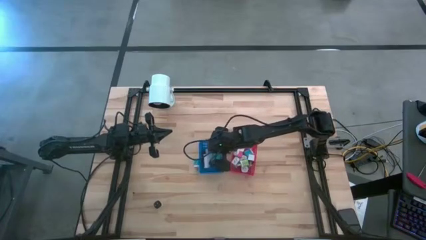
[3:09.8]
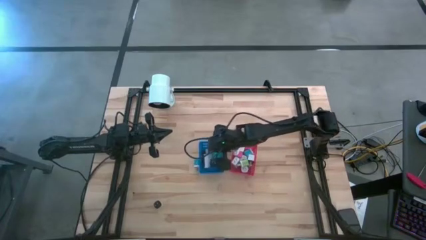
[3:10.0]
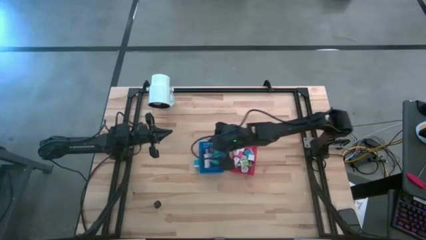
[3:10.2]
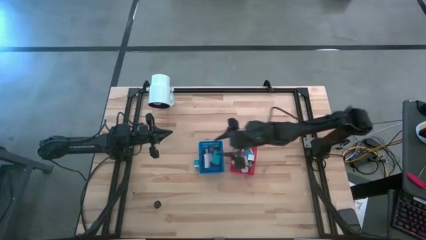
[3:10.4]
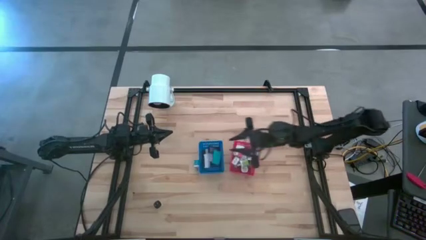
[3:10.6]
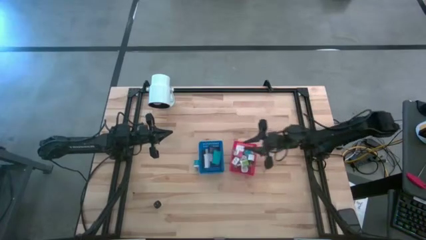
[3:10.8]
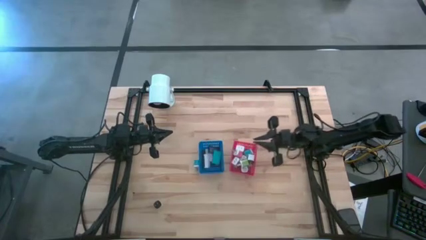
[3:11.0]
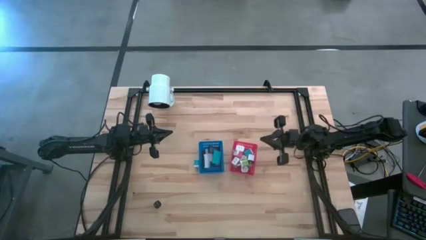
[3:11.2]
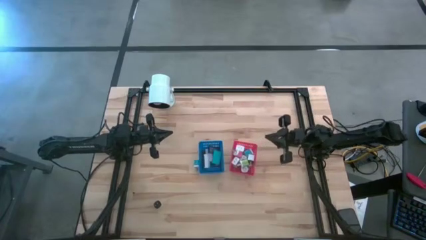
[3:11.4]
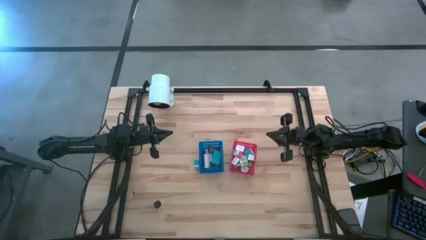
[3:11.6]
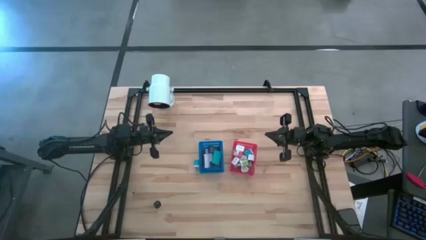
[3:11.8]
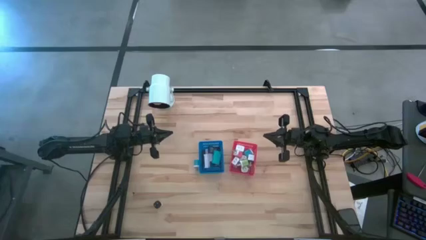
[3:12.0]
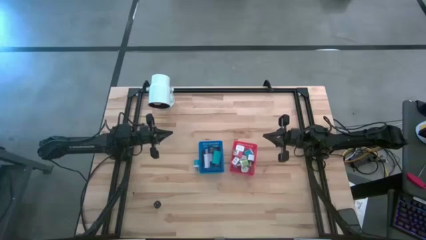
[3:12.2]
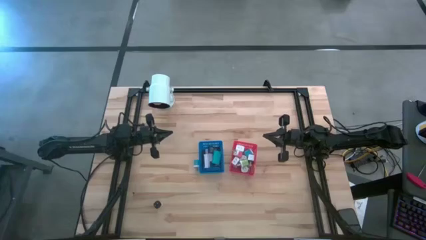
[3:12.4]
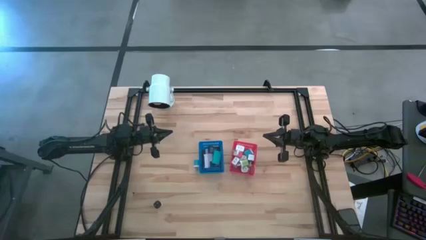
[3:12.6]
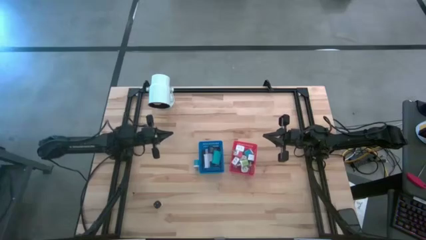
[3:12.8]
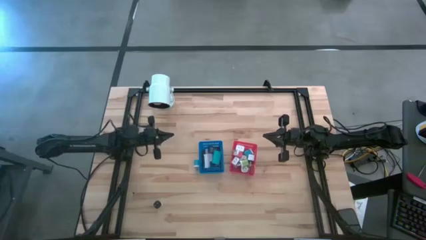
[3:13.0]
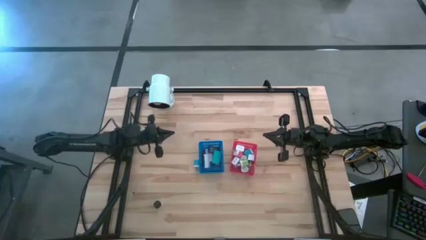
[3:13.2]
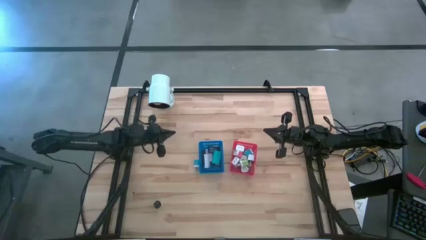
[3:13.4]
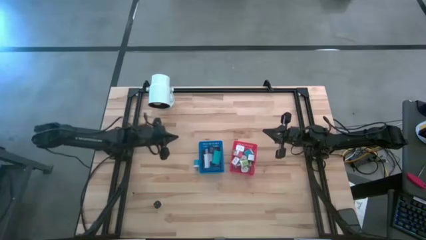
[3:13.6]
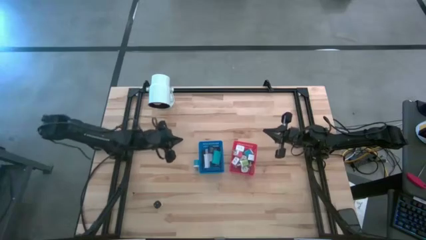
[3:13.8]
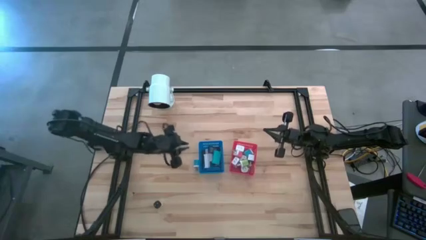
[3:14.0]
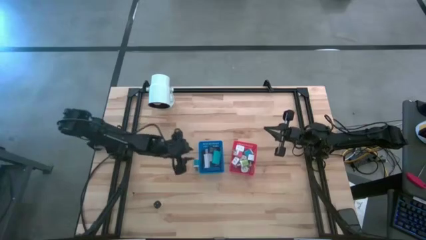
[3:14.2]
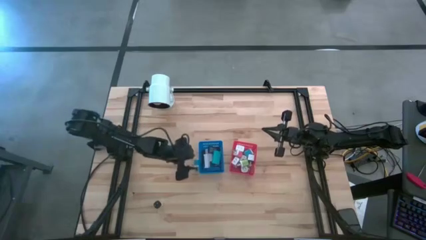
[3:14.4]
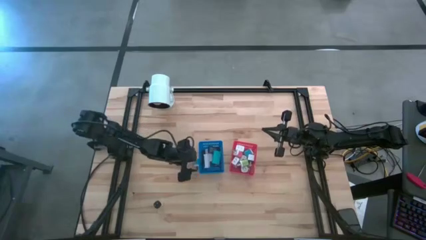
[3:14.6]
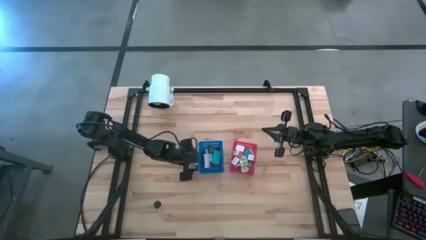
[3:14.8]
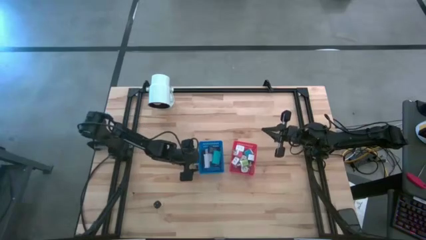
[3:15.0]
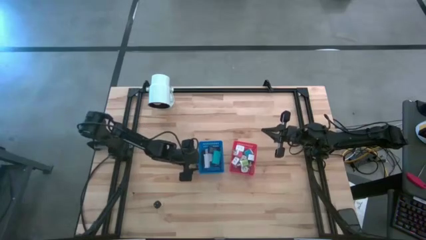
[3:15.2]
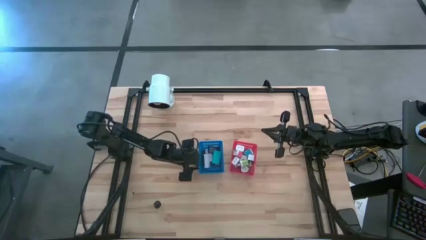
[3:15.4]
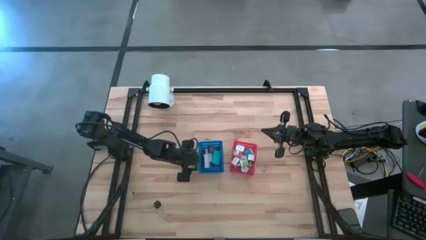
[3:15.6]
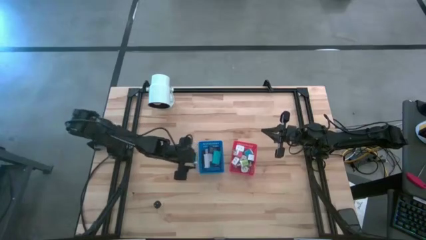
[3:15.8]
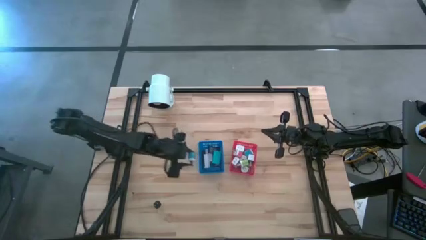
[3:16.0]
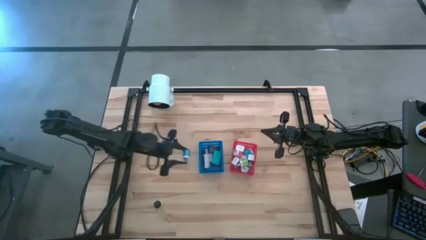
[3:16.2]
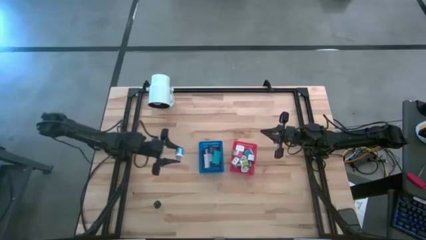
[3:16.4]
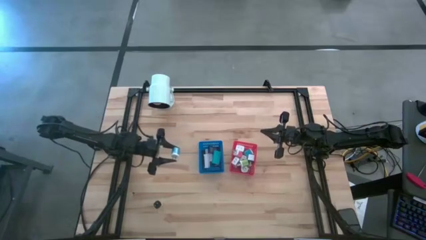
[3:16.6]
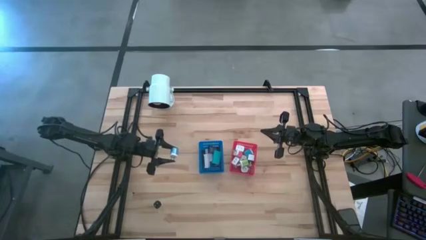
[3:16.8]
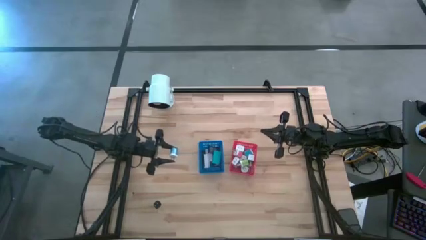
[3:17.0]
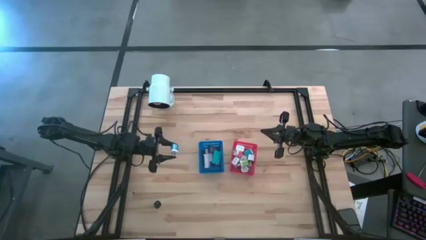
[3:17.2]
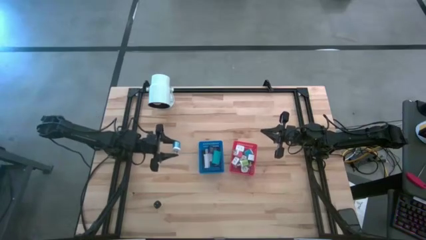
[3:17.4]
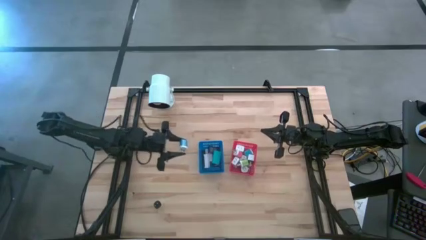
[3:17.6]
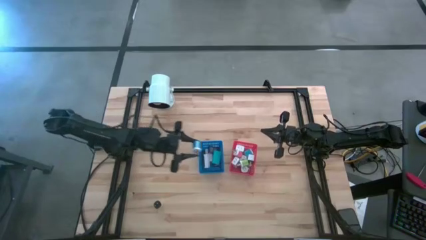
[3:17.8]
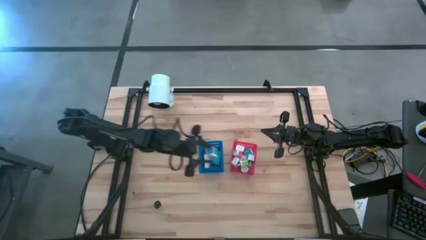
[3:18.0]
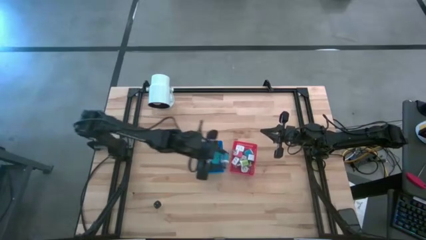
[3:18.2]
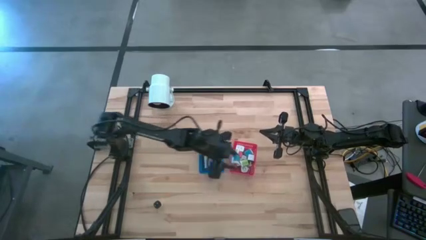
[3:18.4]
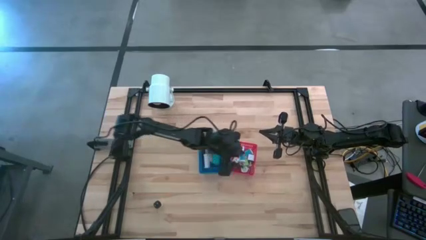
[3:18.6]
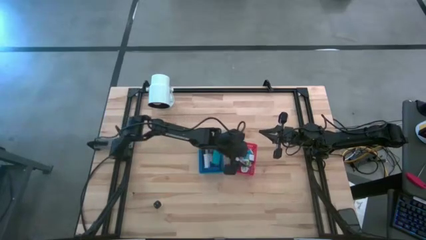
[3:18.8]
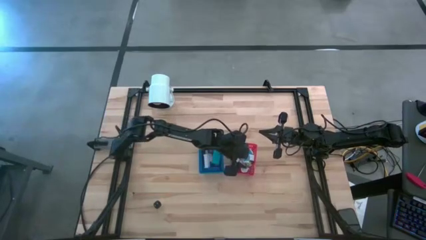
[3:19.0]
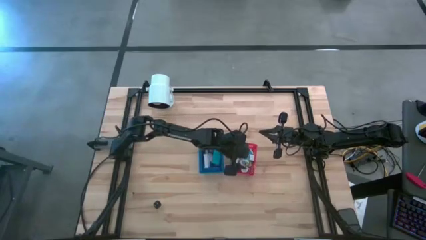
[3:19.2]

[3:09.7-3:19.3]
Task: Sort adapters and digital timers
Put the light blue charger adaptor into the red bin

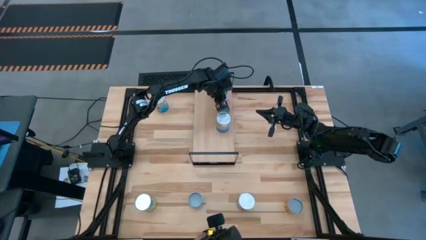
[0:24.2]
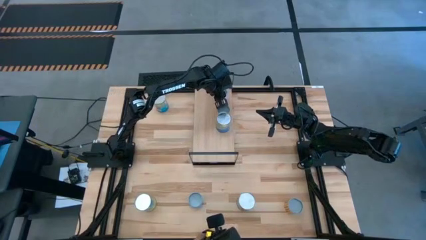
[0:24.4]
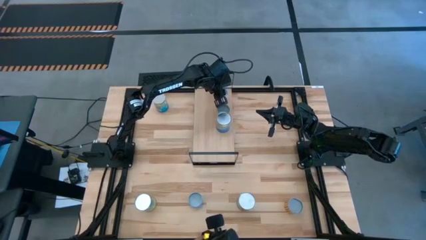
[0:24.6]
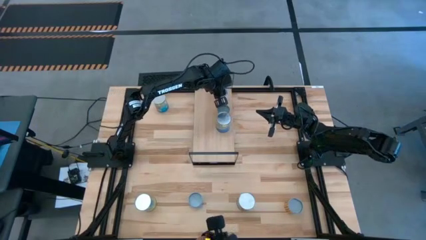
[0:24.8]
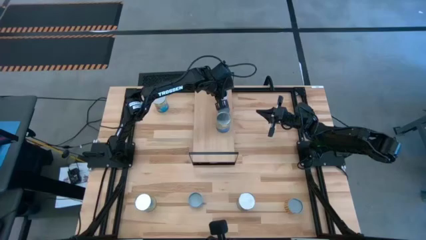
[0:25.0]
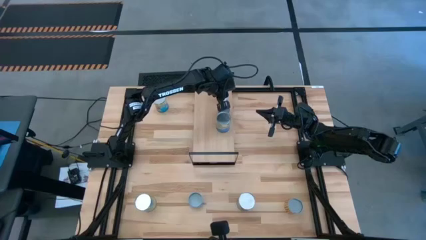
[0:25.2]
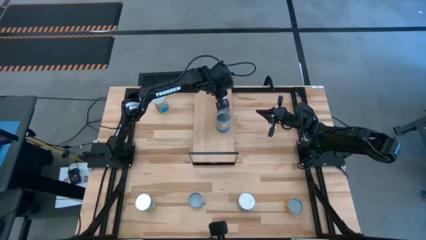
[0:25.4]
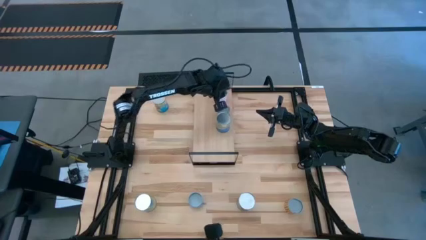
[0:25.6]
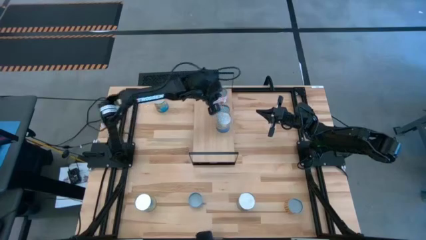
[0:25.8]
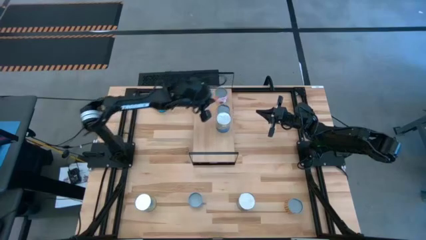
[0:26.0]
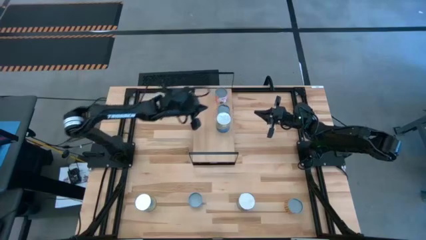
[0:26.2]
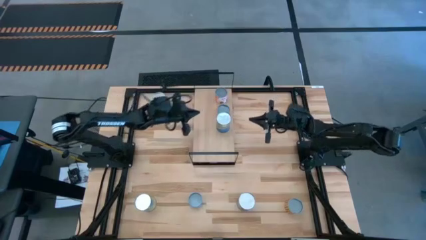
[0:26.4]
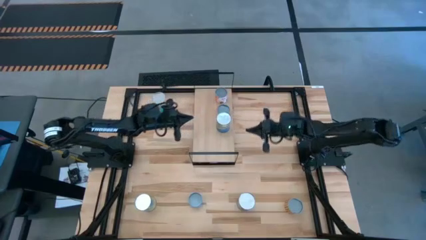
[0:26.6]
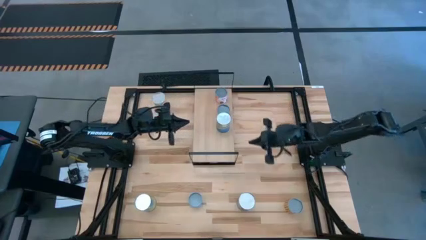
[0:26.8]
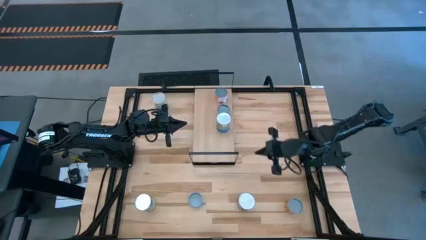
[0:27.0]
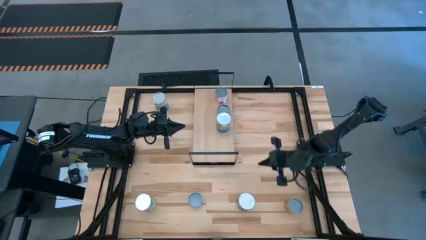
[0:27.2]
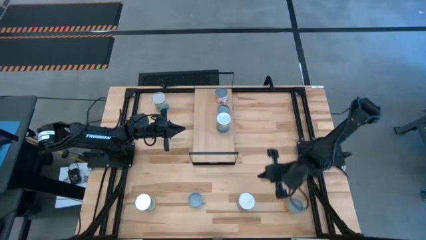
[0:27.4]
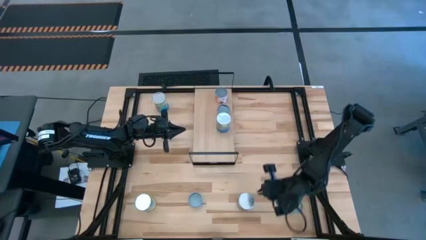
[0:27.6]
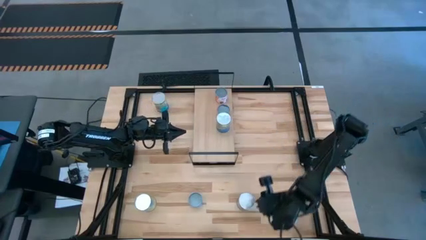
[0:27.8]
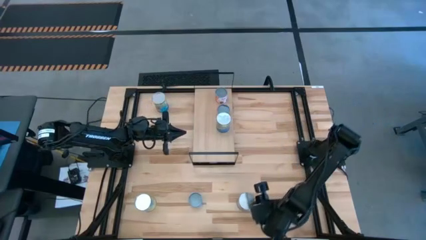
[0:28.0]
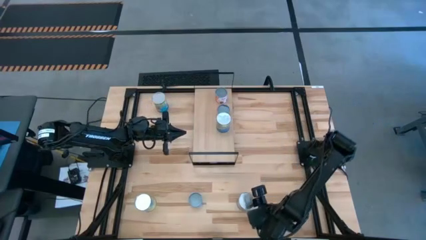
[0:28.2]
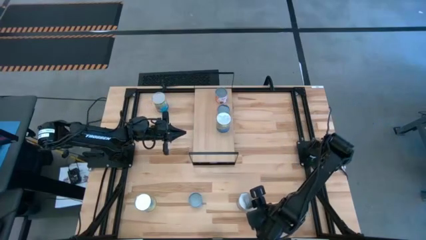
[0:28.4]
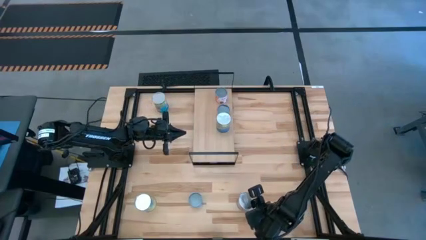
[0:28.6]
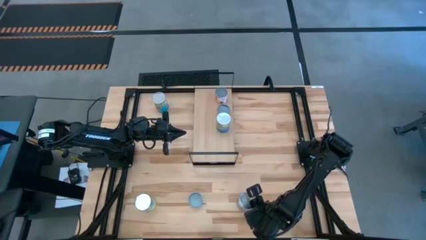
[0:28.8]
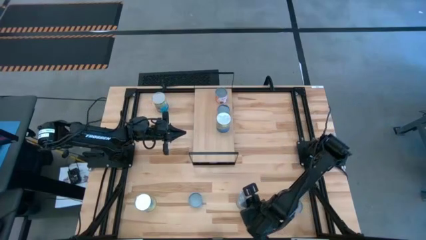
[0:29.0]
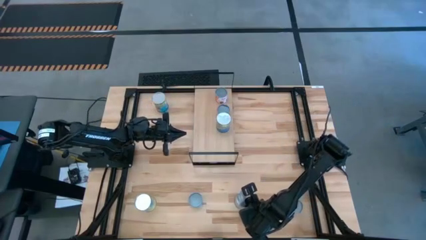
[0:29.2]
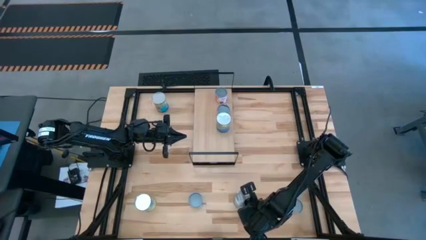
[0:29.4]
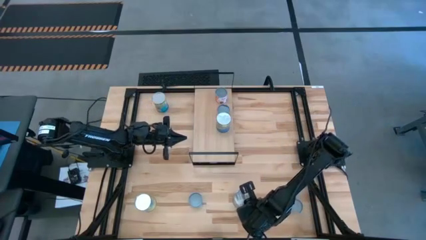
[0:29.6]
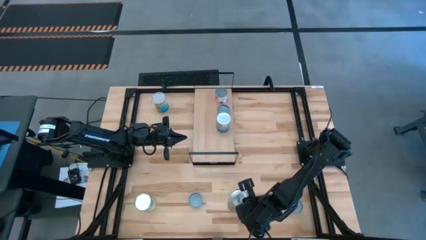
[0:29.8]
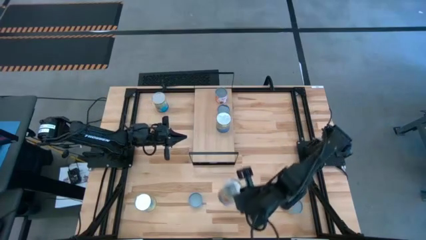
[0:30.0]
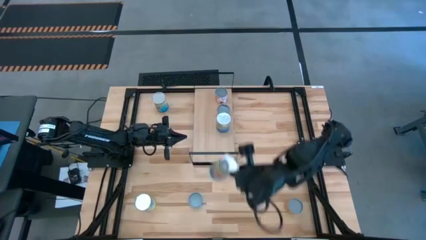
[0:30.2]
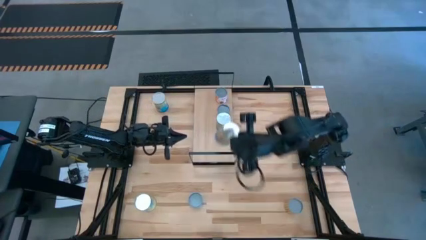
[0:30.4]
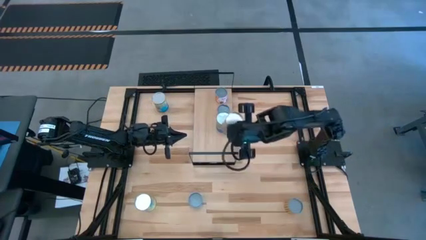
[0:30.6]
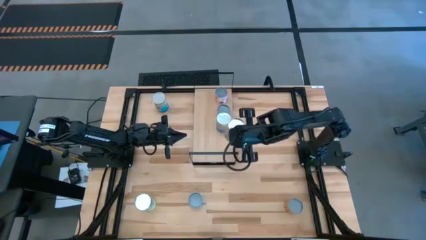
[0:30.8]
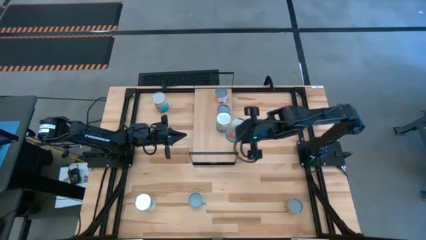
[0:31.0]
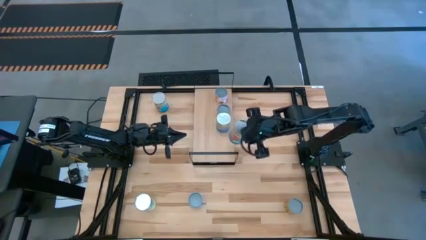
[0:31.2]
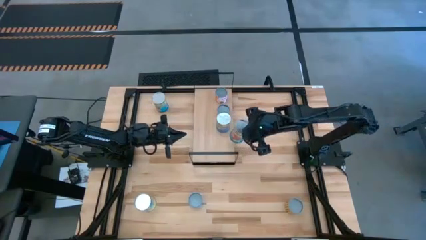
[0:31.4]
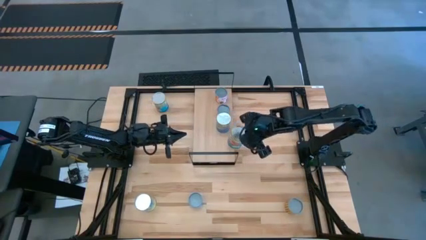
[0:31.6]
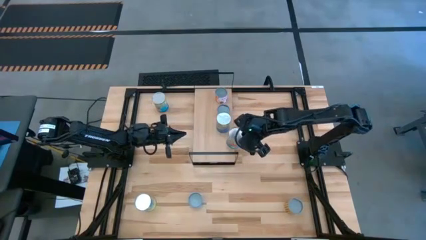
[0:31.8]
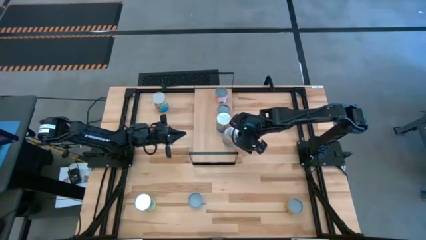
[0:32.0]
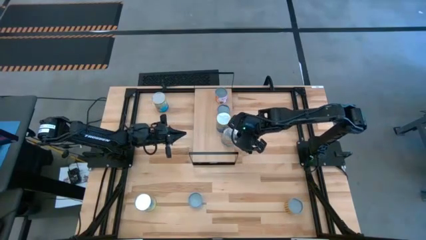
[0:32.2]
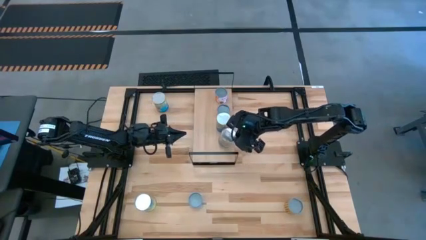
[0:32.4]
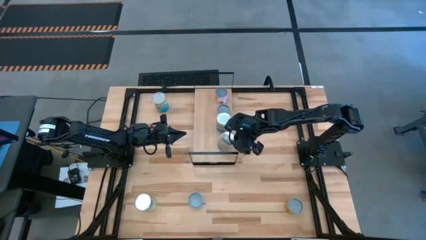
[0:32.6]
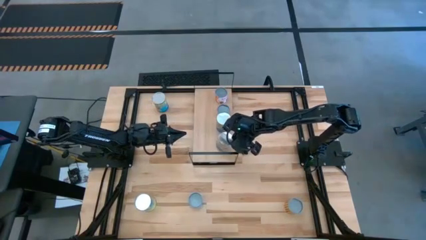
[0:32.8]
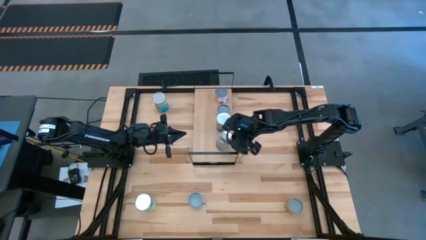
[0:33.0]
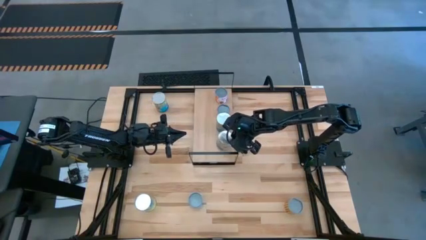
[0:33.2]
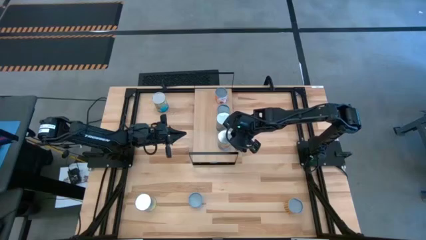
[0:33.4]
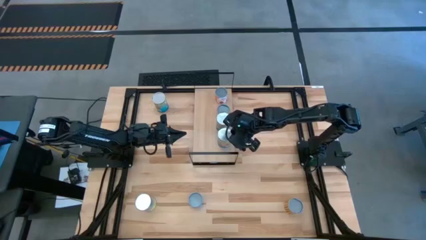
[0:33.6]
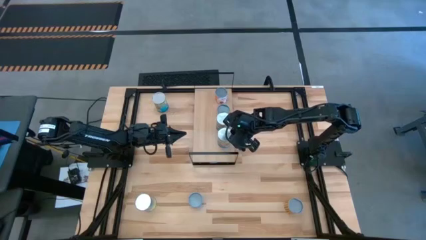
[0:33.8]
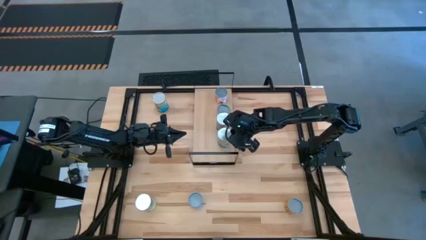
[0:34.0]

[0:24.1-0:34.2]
Task: Pick and place cans onto a shelf
Put the canned tomatoes on the shelf
